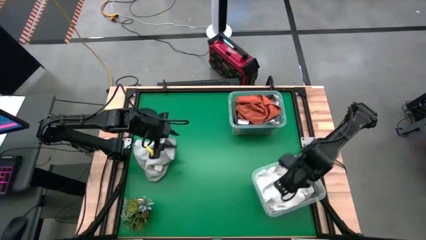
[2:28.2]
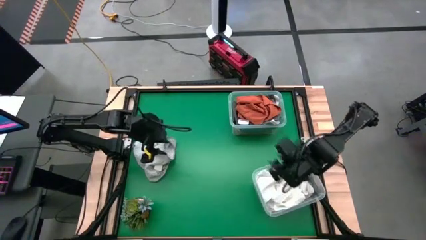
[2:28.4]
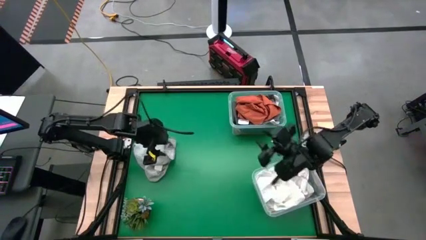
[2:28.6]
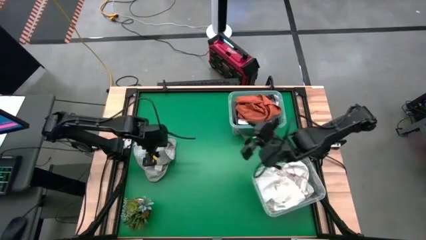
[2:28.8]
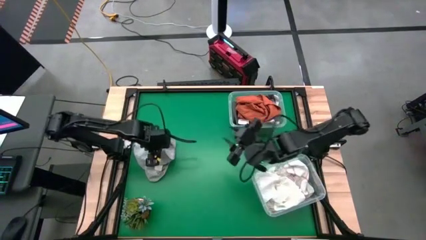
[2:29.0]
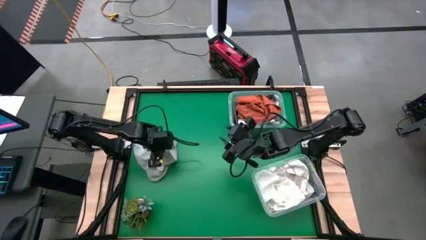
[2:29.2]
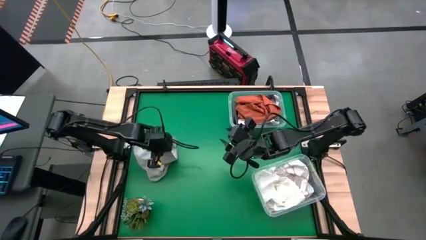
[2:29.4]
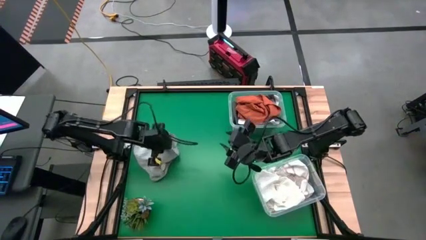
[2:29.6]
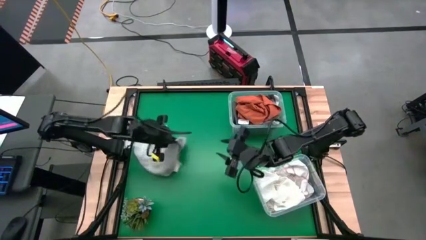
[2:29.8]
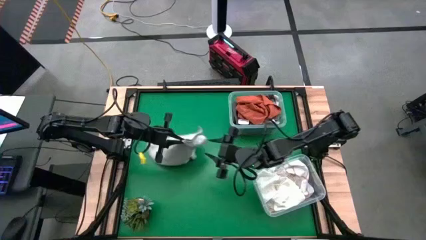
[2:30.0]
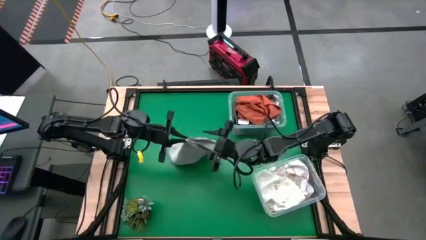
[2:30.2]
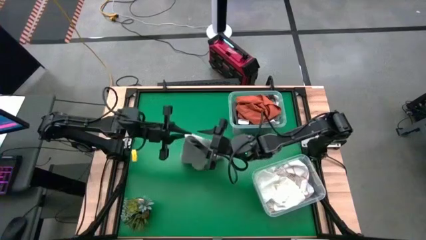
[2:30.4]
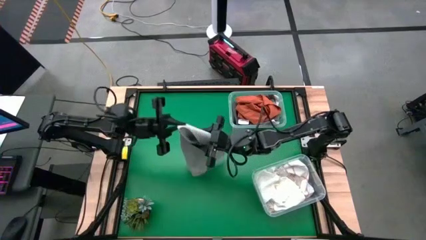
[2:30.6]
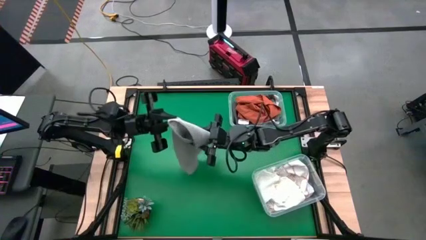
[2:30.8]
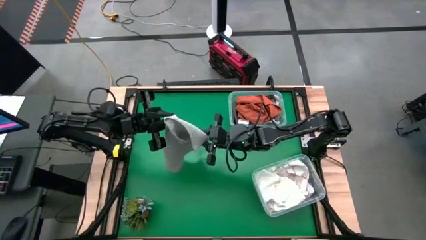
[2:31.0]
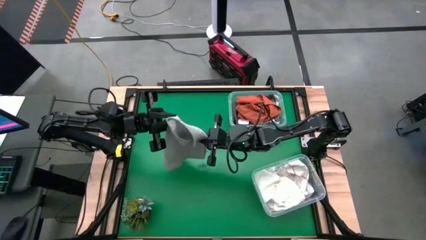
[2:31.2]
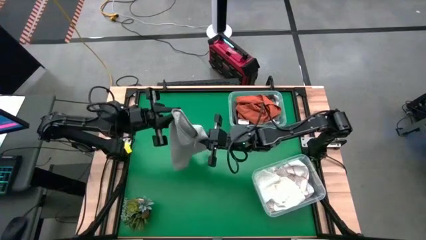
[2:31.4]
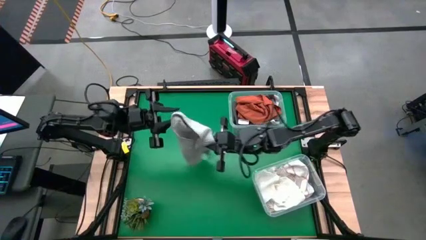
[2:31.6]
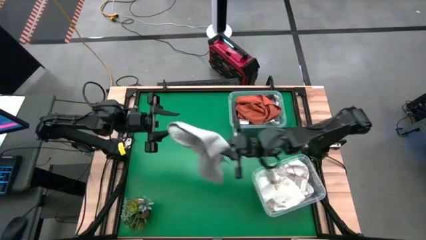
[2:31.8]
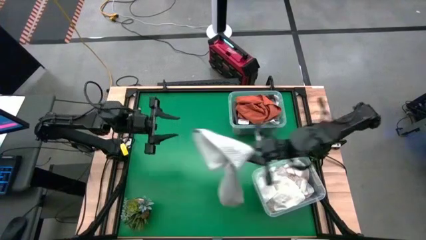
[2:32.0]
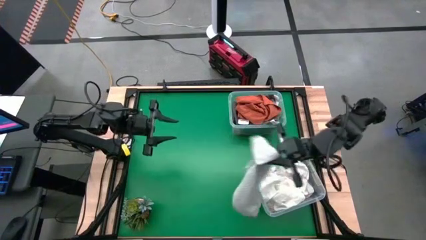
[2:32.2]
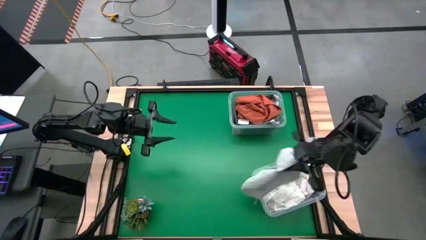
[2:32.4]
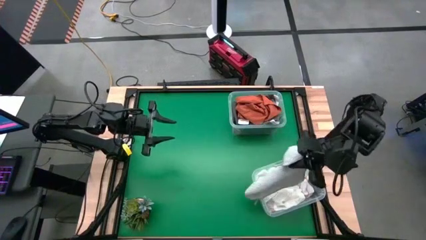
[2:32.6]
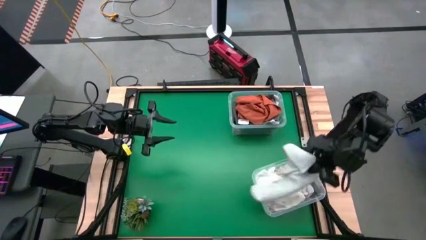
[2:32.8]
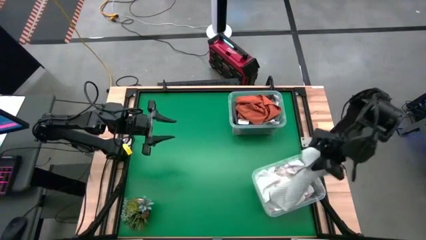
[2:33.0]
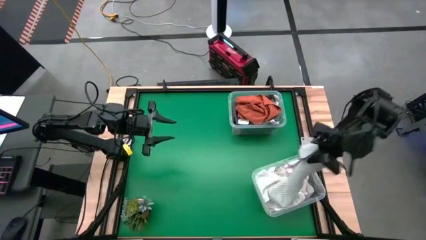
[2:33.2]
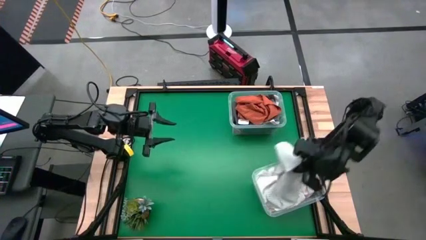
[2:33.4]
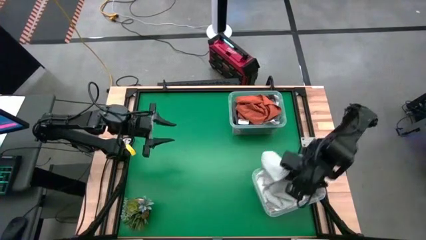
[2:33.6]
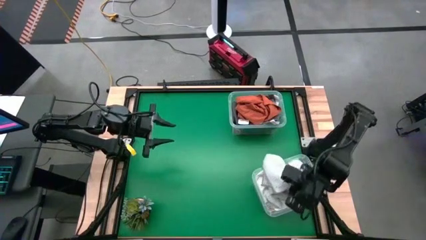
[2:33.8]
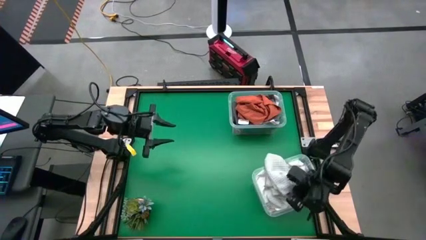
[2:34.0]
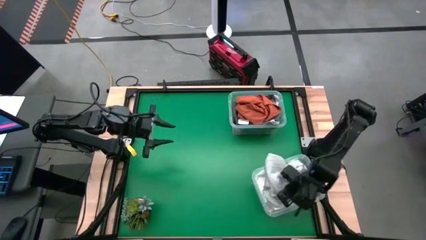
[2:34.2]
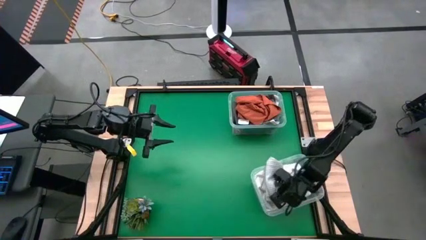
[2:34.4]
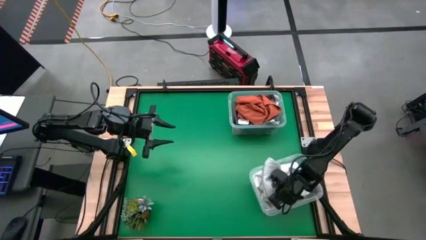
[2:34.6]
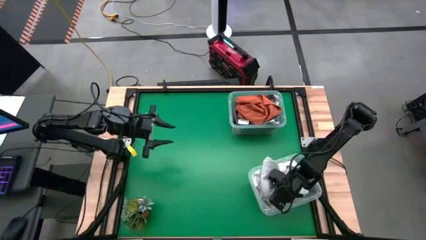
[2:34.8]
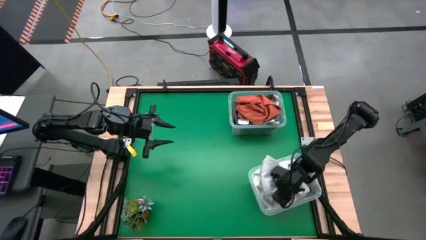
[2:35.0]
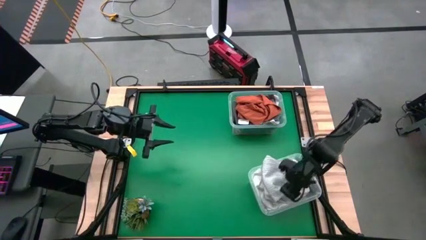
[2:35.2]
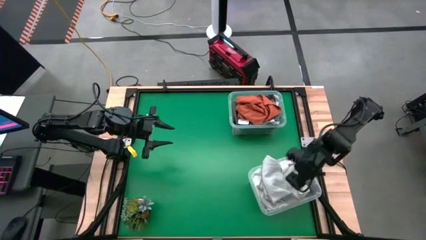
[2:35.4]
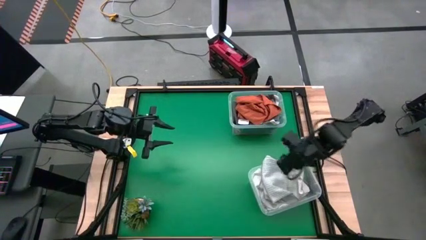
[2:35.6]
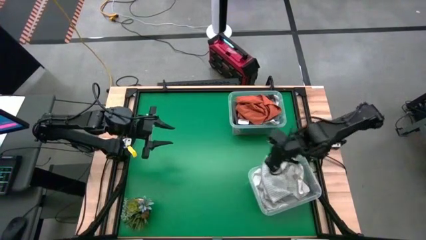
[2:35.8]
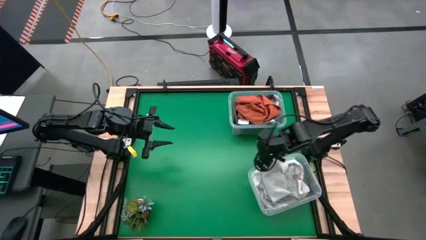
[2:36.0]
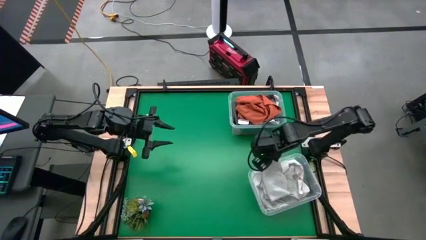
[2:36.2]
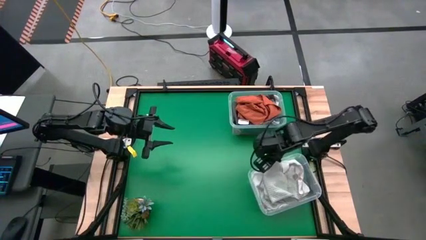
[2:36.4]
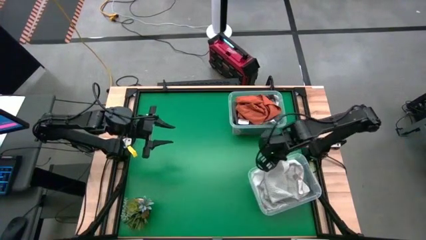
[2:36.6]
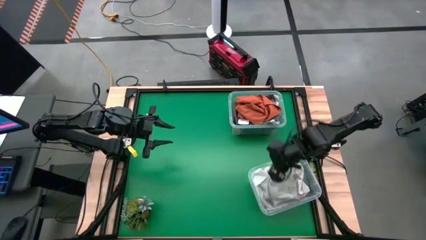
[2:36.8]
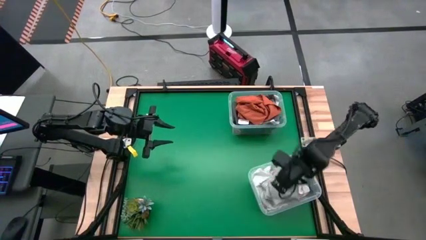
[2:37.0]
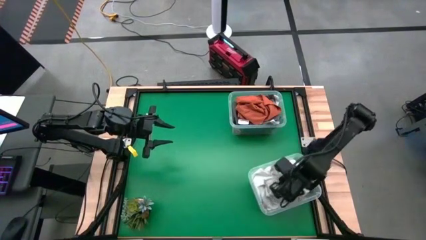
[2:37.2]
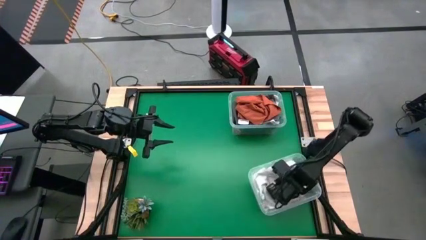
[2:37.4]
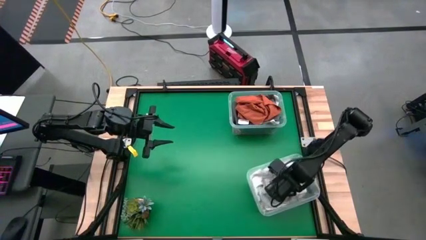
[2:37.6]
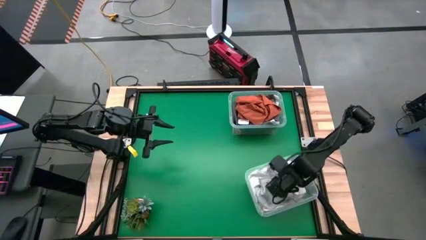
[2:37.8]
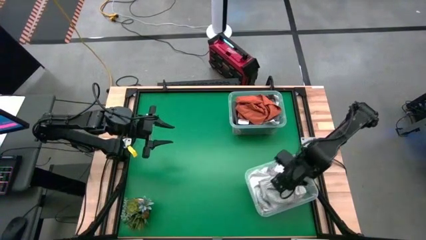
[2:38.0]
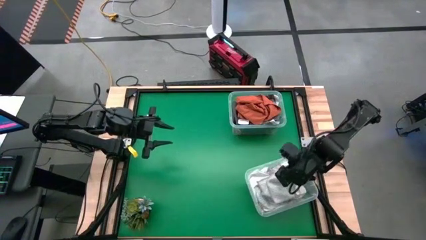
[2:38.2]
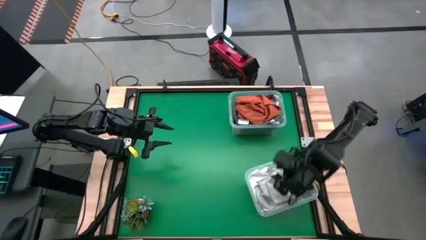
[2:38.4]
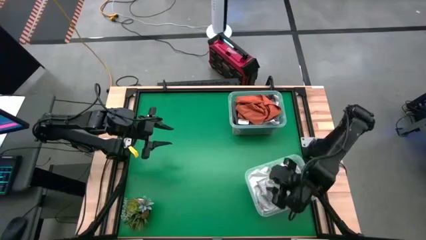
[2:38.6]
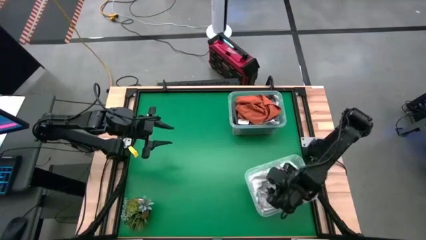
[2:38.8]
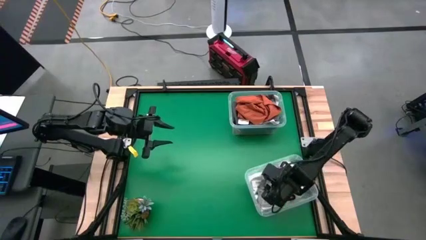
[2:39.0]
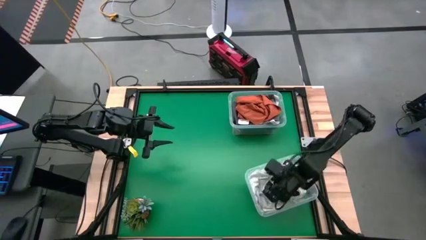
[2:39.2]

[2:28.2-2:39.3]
Task: Sort towels by color in basket
Put the light gray towel into the bottom transparent bin
